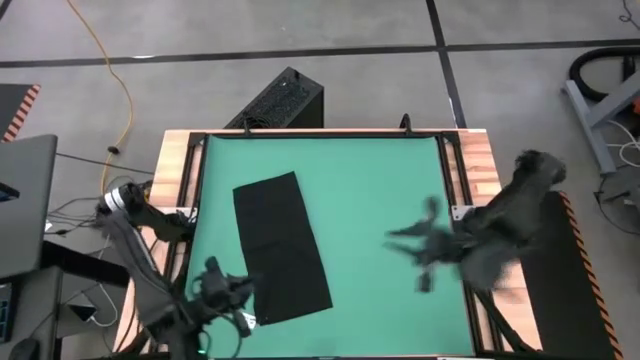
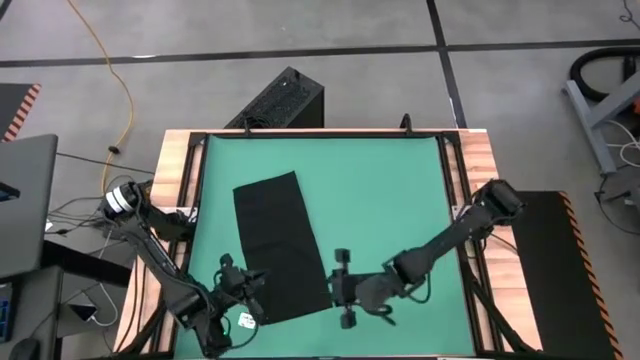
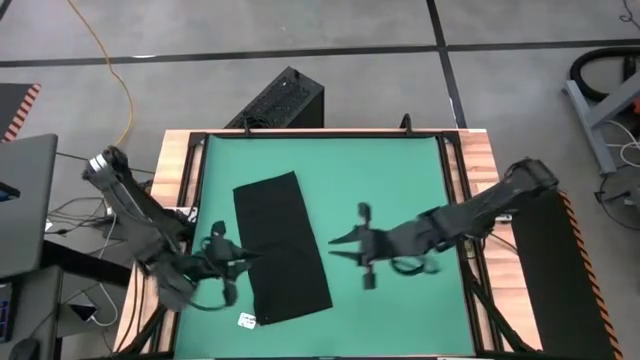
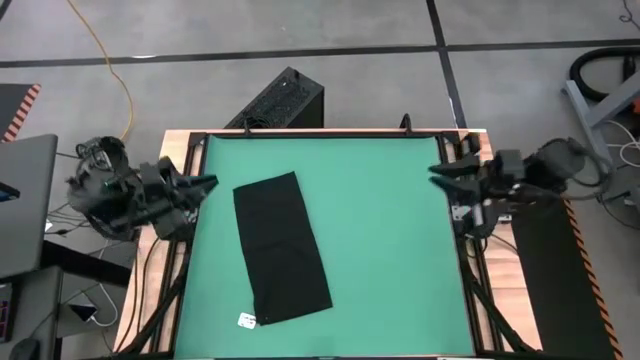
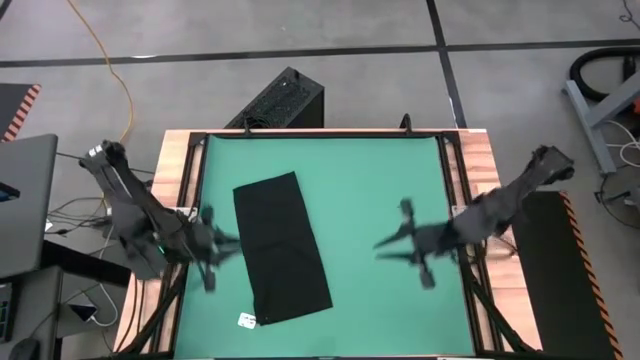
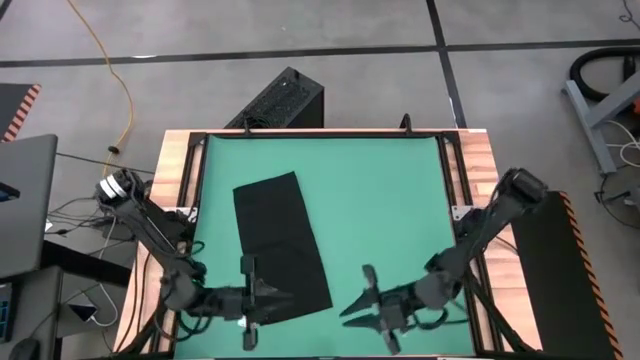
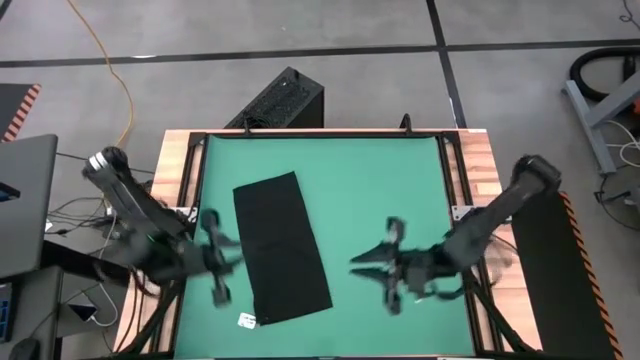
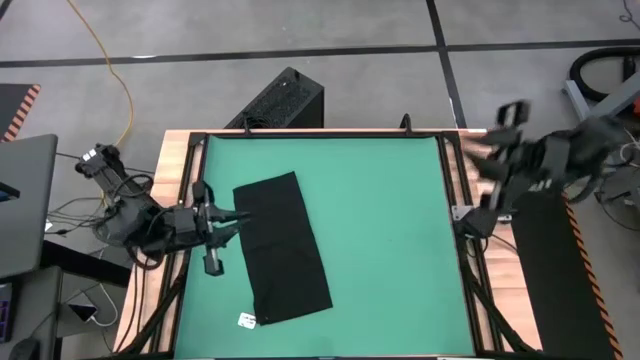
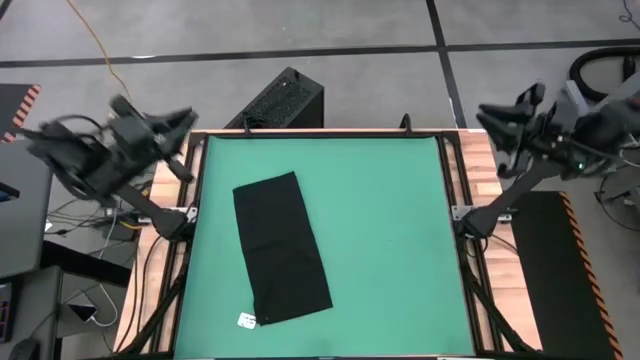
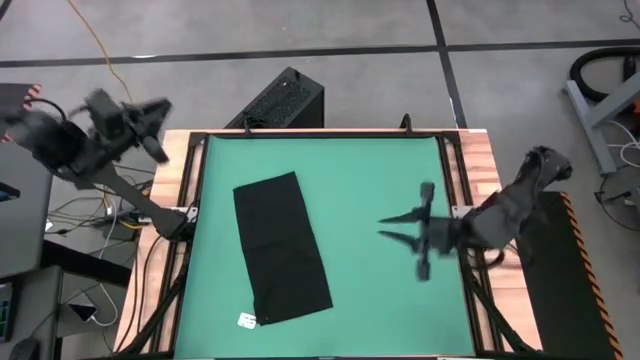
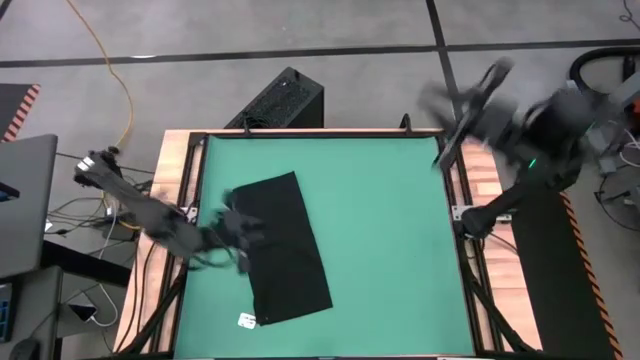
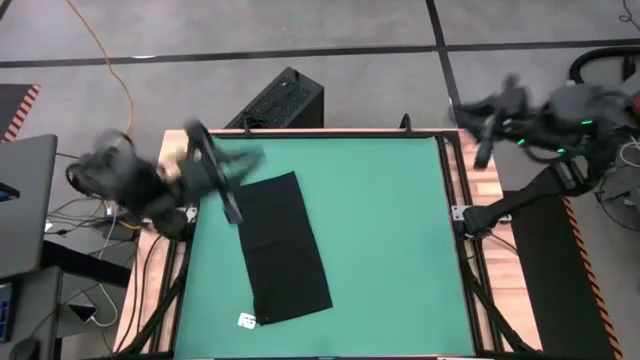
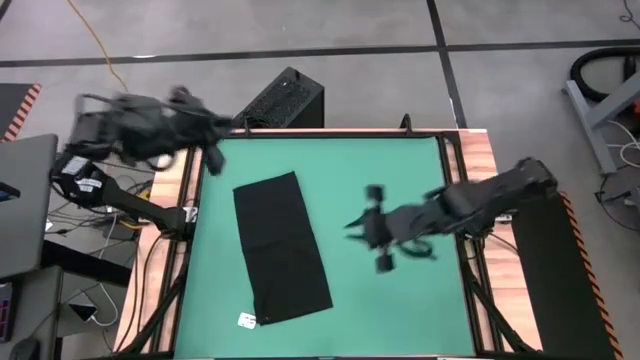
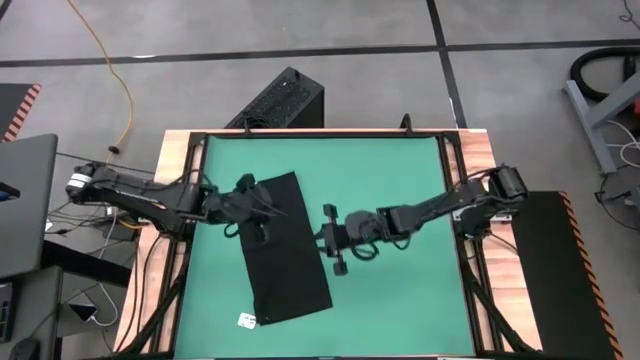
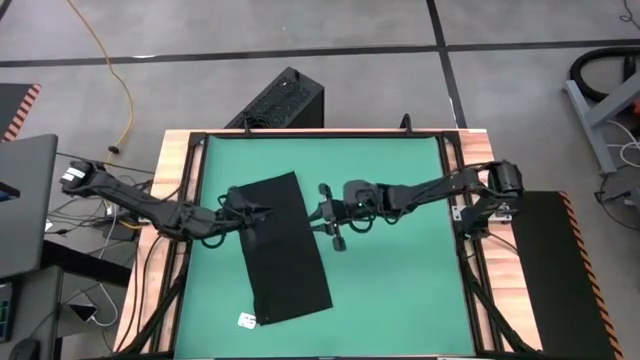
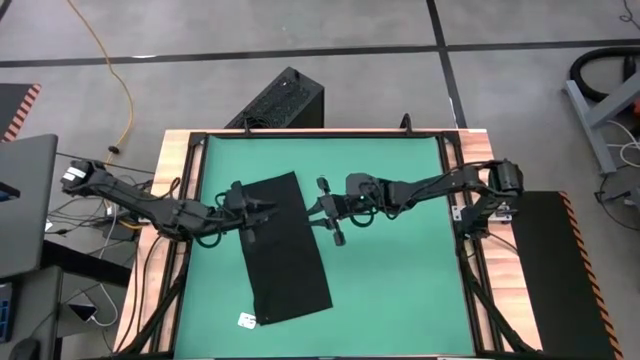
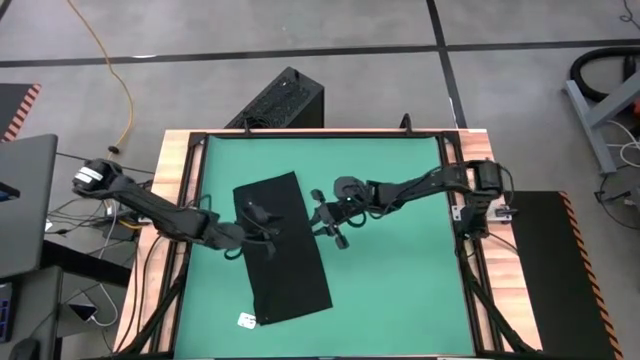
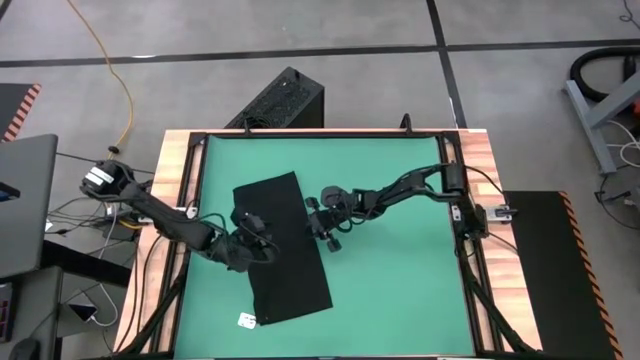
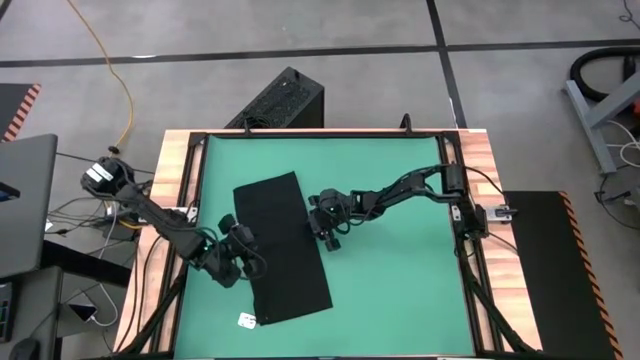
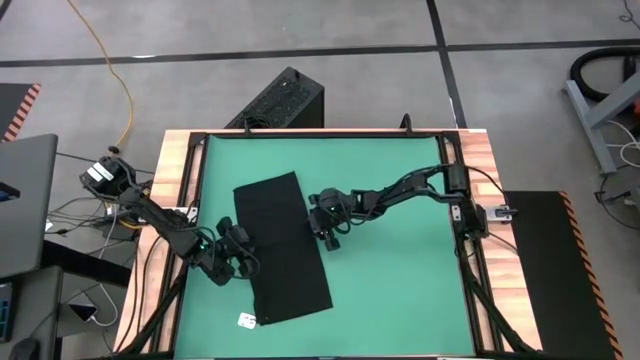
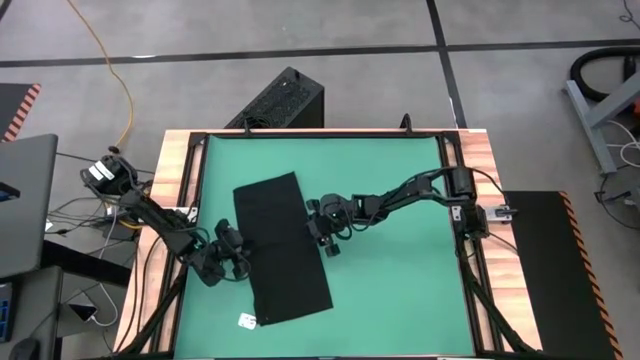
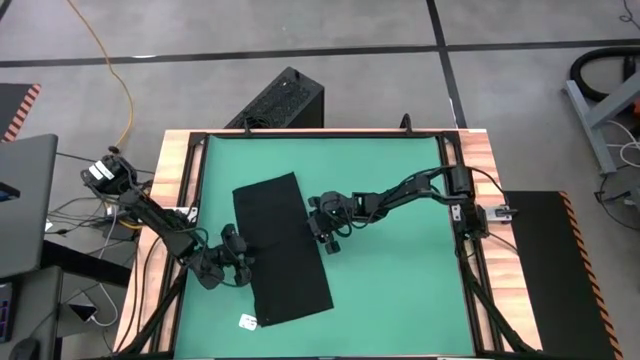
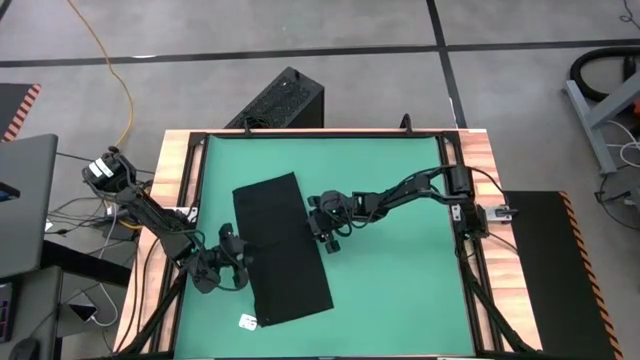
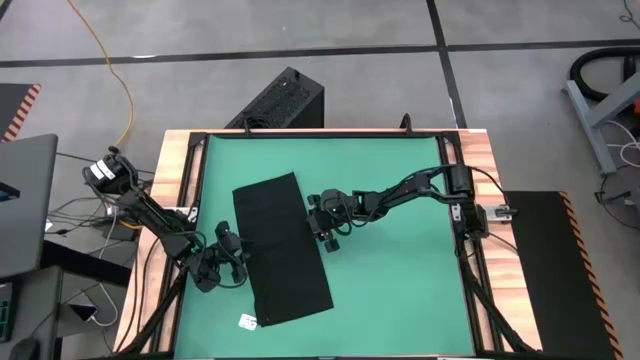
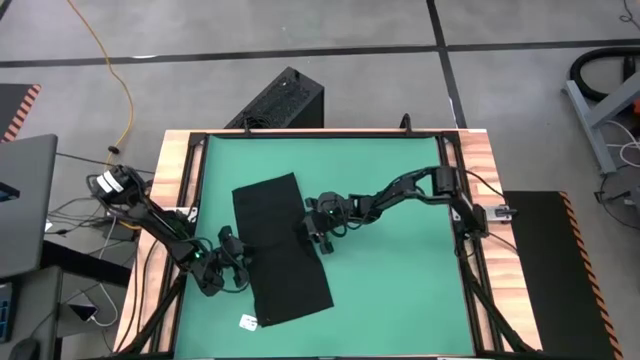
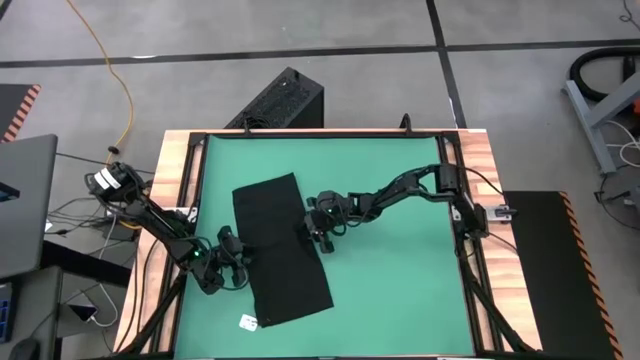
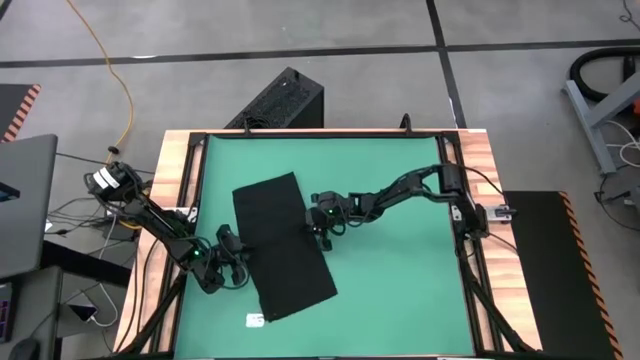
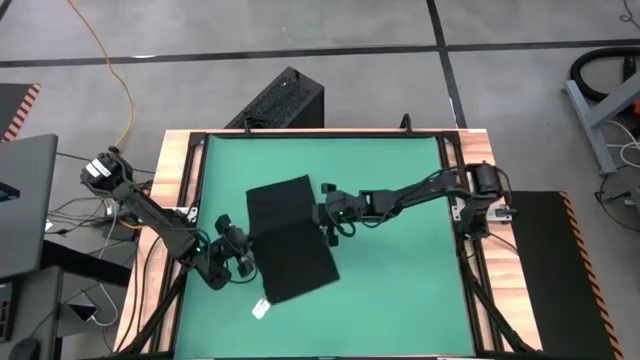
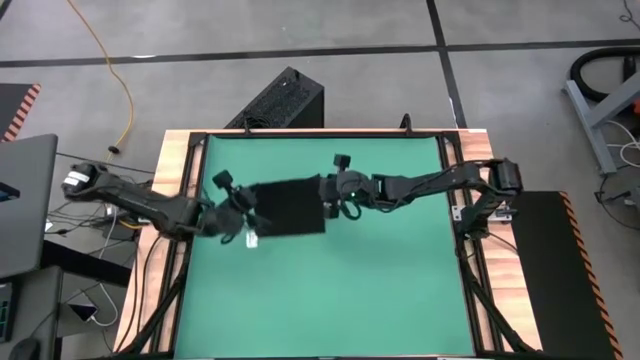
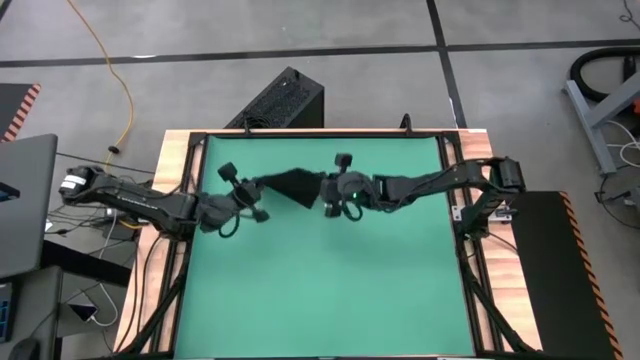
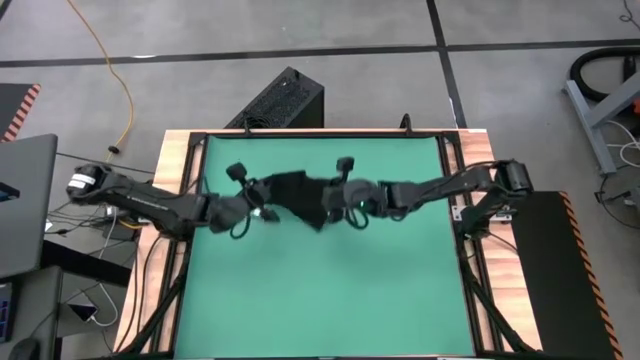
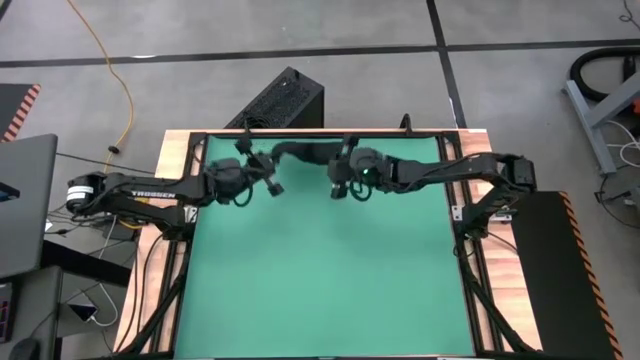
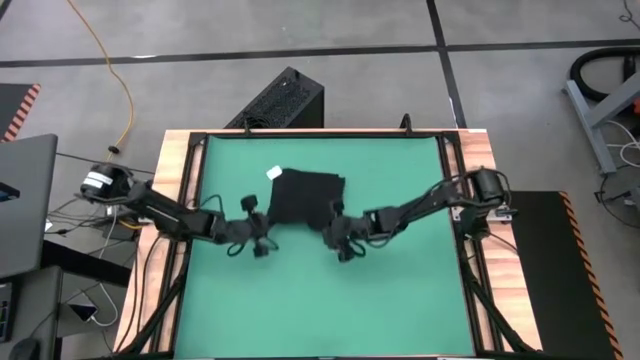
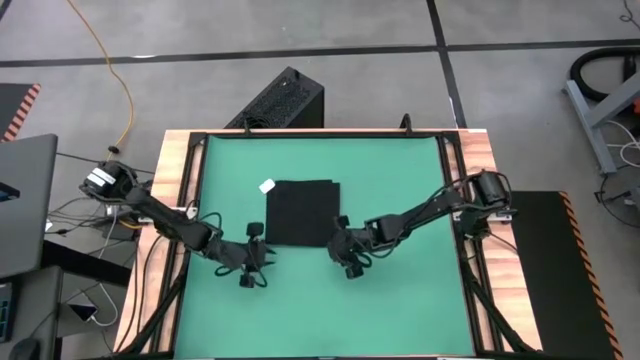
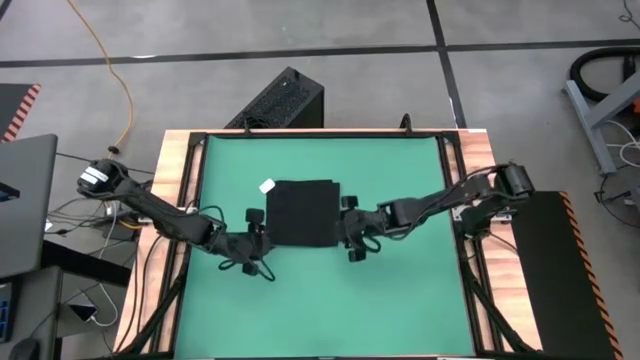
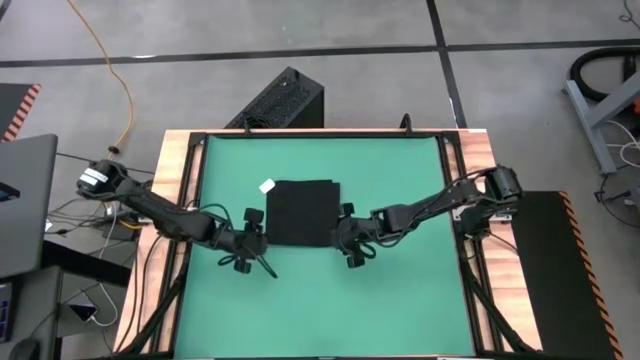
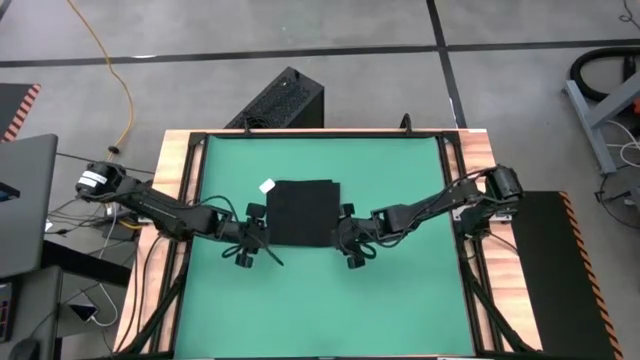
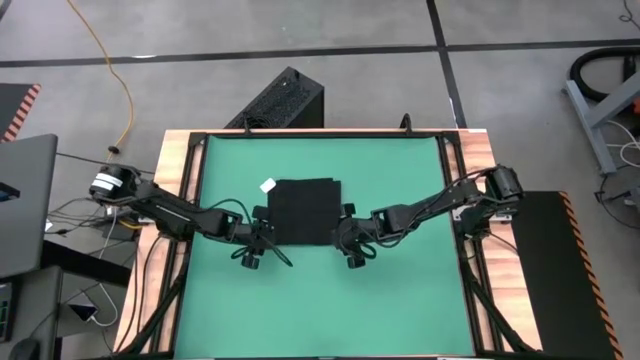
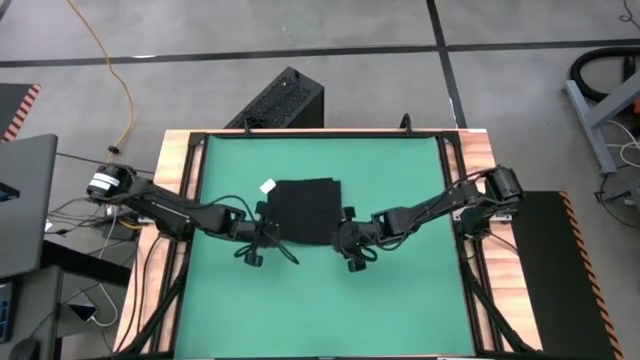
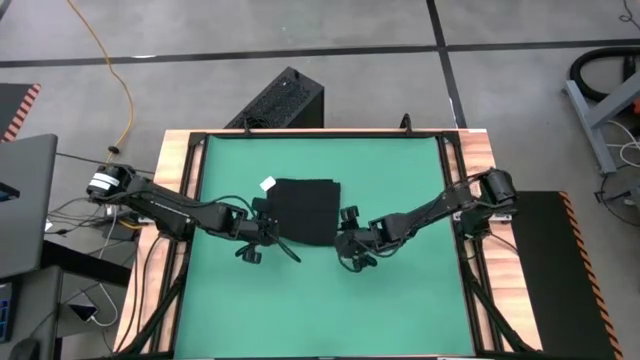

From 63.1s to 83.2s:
Task: Roll towel
Roll the black towel
